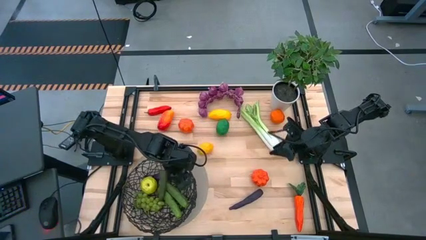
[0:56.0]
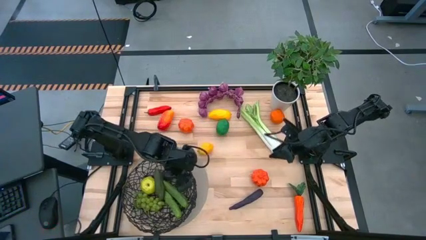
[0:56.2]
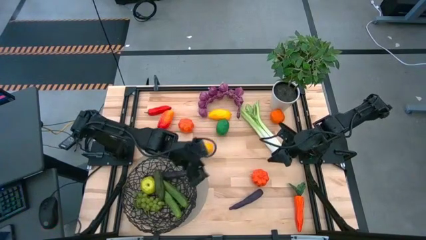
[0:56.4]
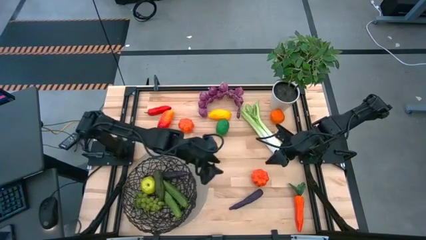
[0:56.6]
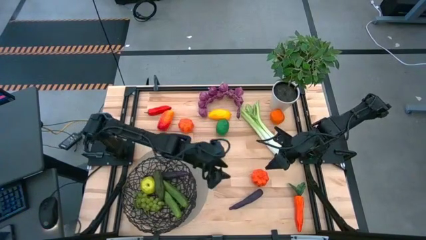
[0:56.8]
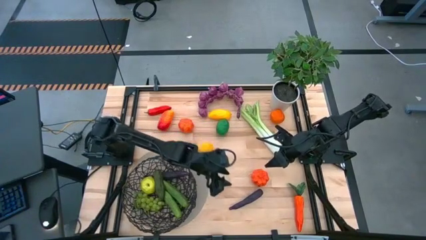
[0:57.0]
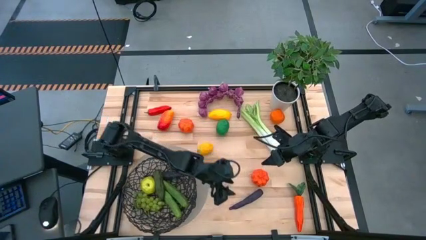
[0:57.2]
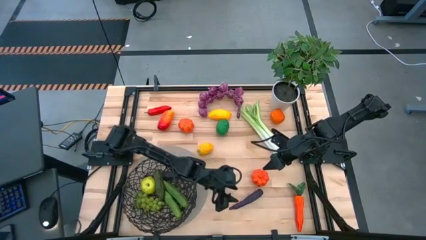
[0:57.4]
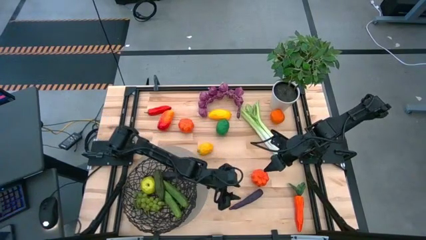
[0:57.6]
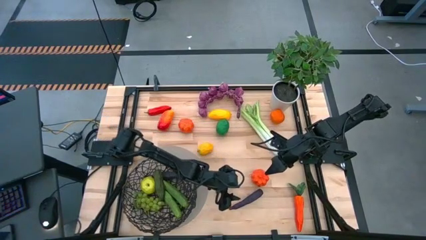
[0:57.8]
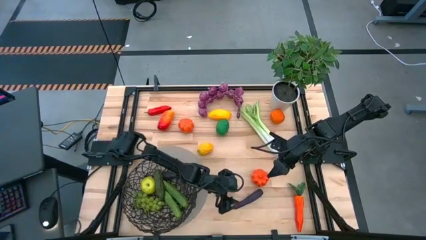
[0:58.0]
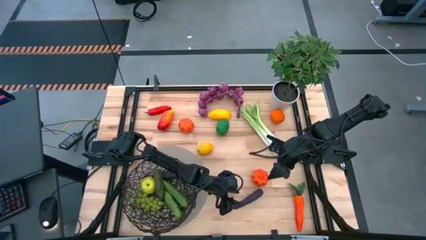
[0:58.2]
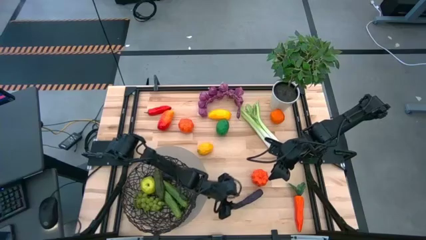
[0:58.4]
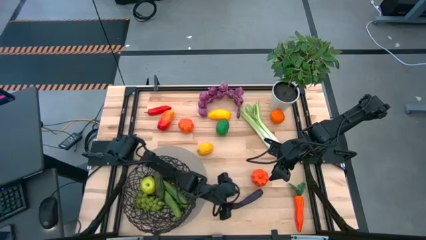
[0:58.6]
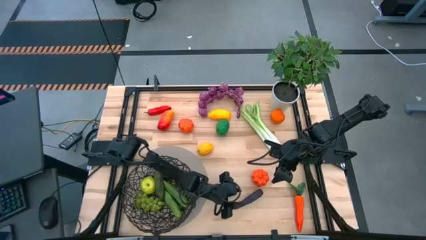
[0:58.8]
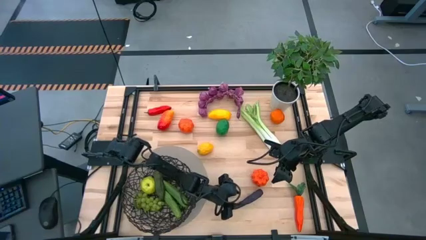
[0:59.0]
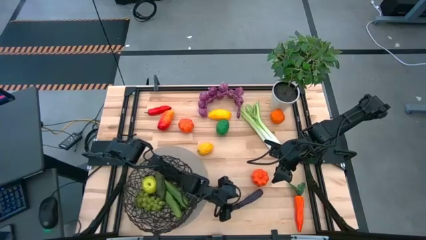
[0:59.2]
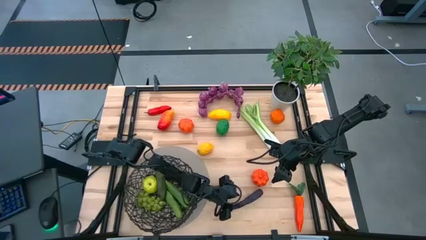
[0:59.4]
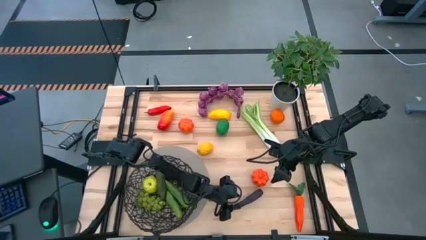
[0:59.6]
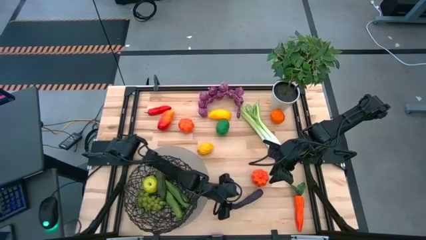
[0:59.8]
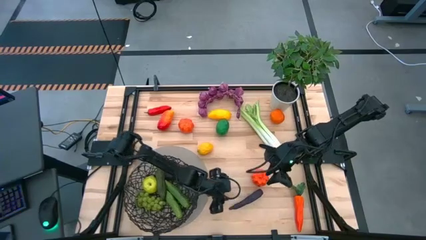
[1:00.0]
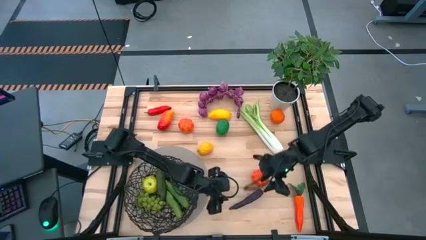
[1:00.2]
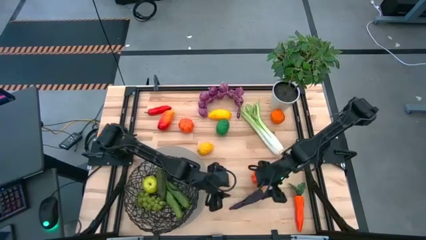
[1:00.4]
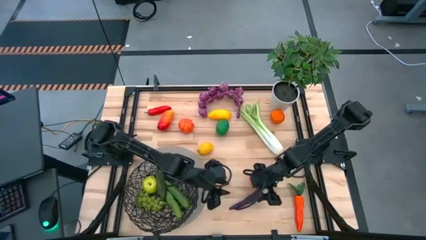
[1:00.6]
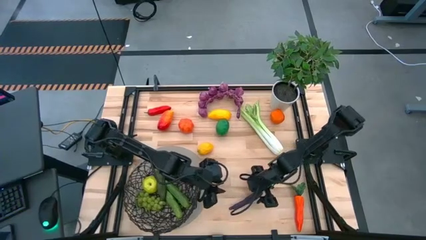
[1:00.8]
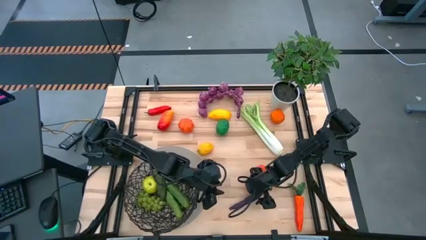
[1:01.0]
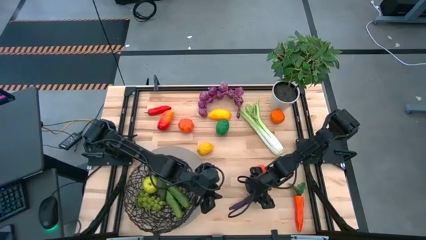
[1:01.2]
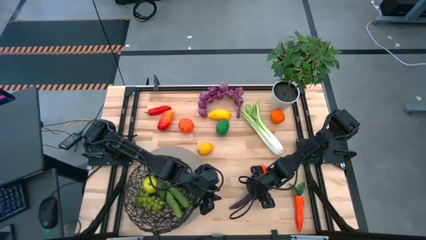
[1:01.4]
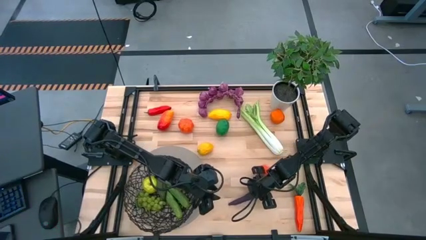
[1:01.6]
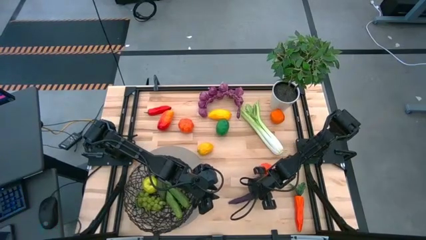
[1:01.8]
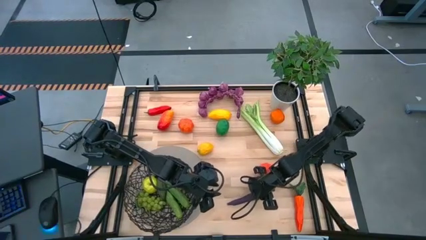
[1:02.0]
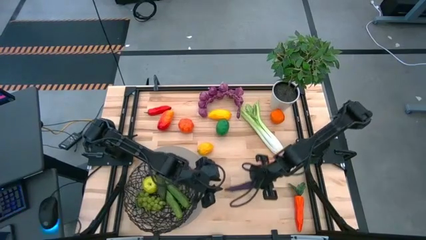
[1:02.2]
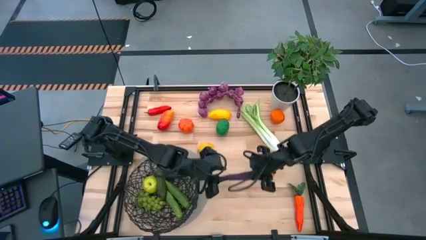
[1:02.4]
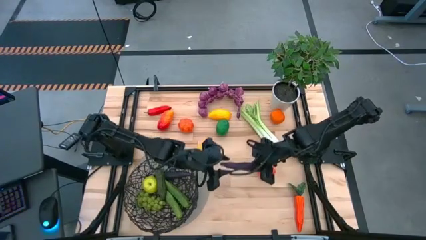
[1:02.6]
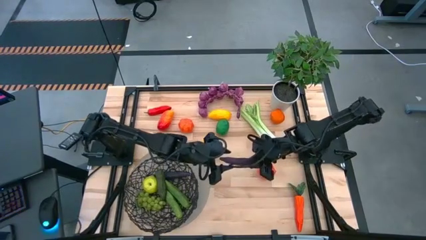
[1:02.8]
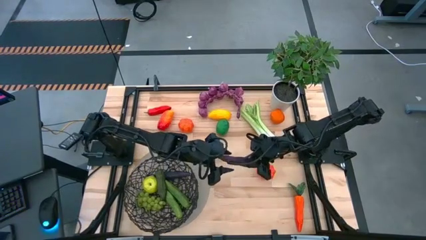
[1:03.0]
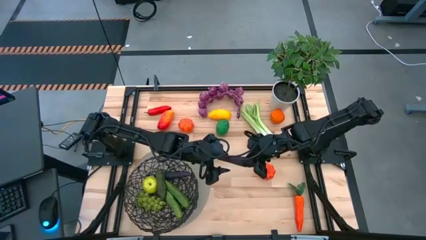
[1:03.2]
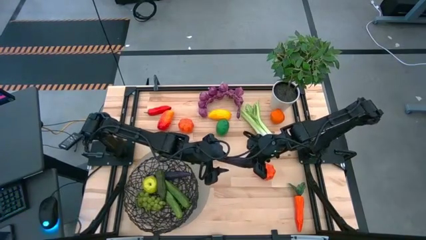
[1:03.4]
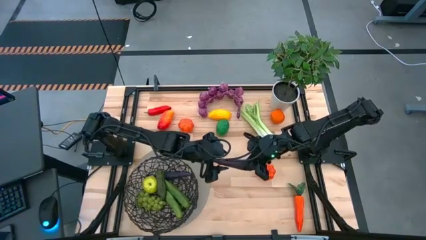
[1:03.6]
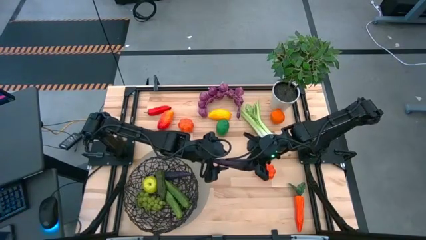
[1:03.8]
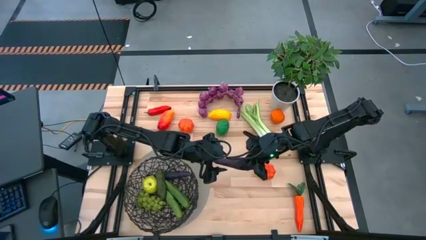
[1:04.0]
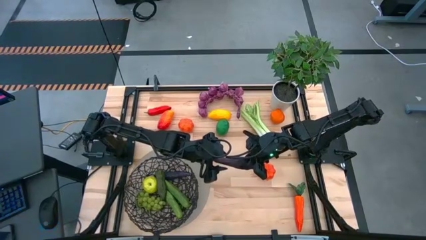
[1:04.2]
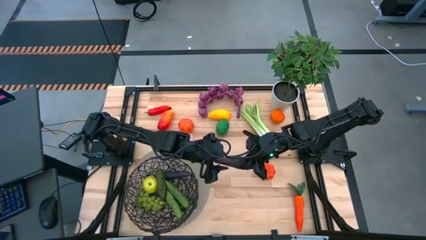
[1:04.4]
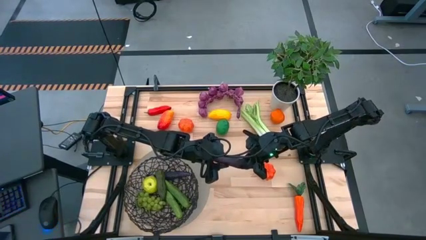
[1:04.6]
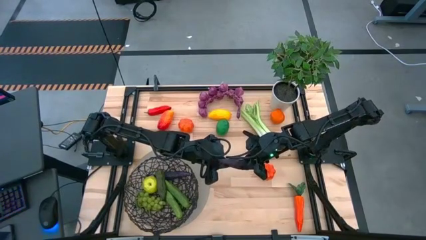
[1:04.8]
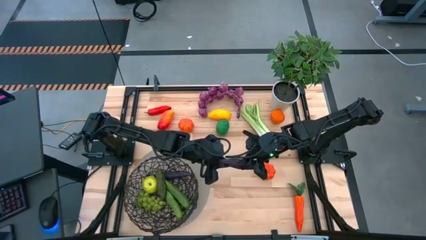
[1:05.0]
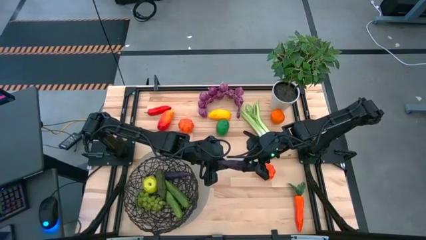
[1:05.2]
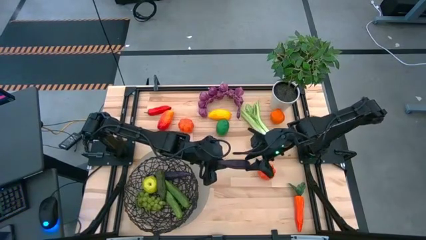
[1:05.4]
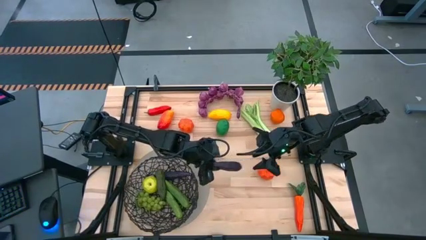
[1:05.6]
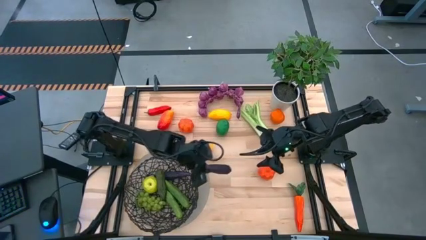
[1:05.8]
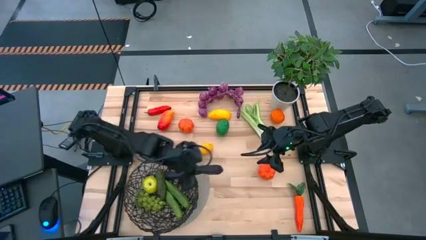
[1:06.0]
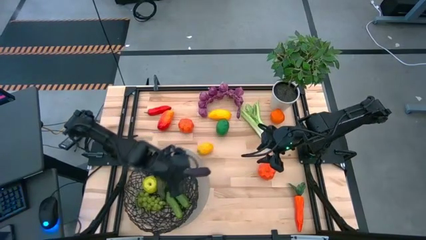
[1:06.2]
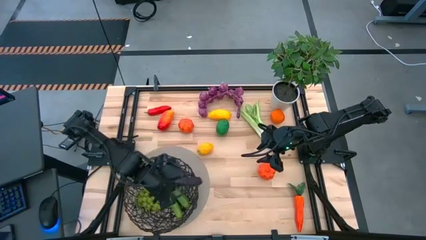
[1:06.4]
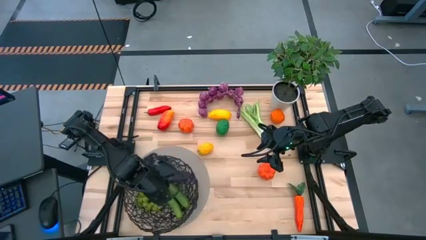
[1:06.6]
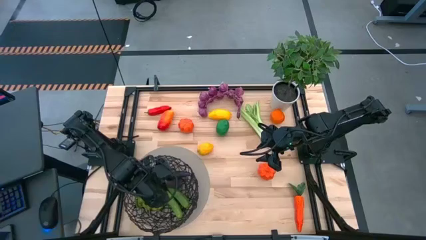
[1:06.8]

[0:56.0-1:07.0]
Task: Build produce basket
Put the violet eggplant into the black basket

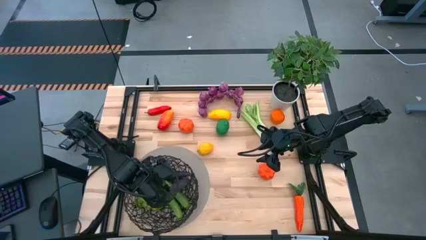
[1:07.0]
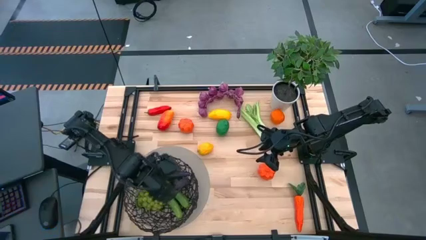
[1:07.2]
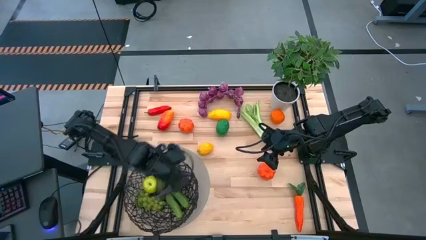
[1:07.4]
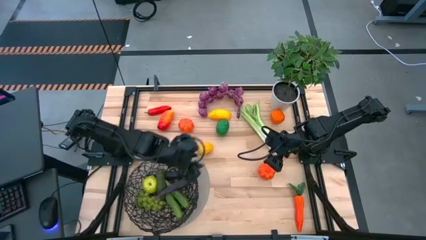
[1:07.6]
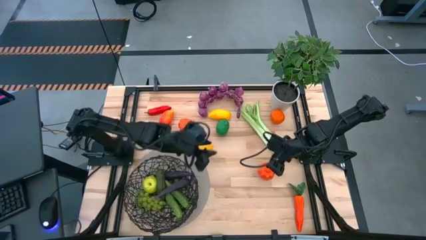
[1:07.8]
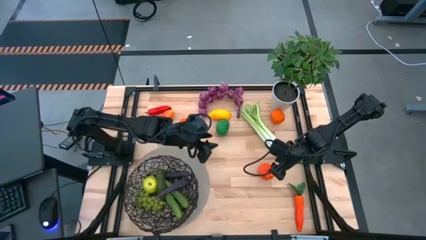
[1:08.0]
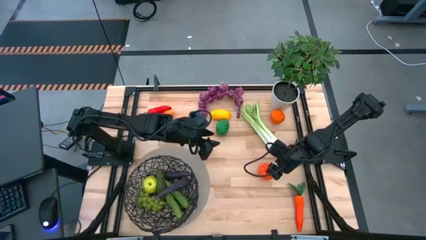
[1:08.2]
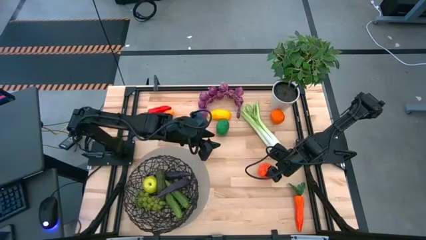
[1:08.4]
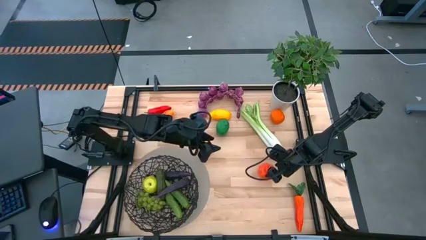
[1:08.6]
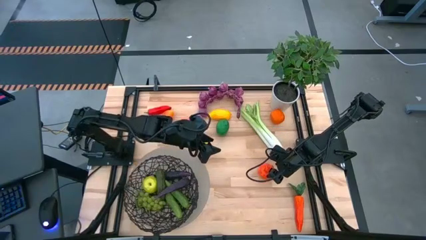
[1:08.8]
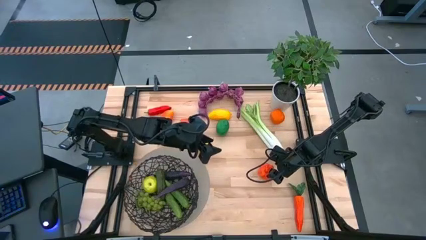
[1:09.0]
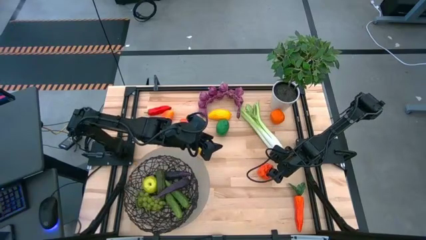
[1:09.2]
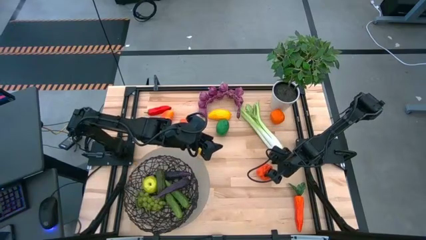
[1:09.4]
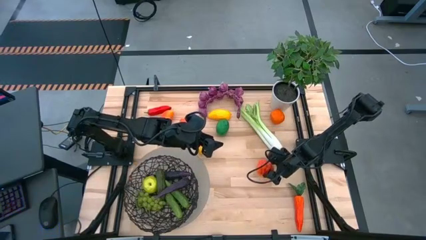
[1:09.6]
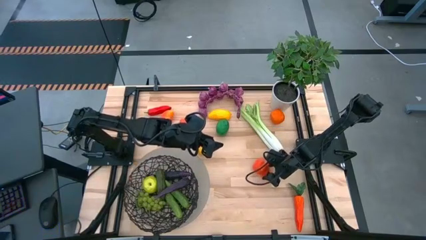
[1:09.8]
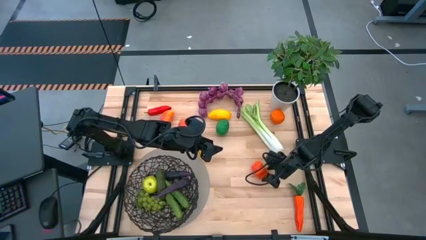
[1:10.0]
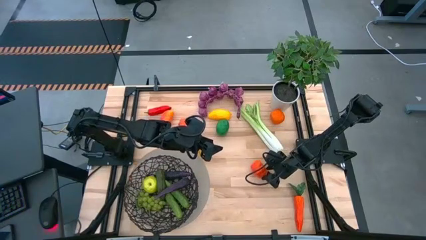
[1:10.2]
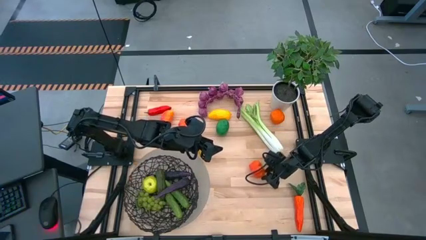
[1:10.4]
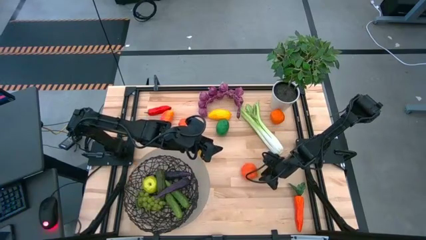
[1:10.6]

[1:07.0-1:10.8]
Put the bottom orange pumpkin into the black basket
